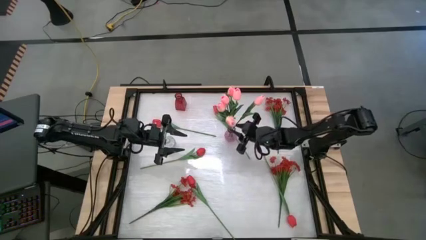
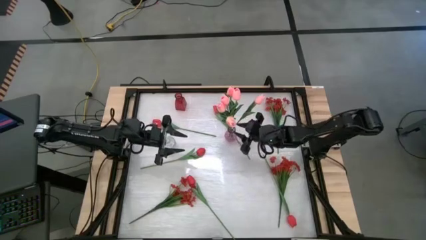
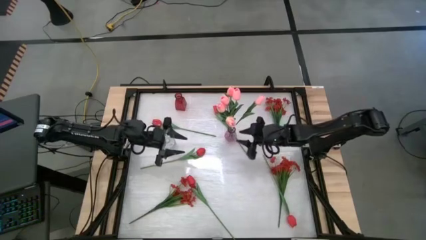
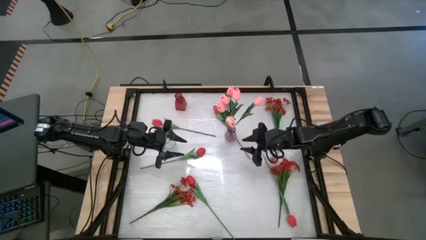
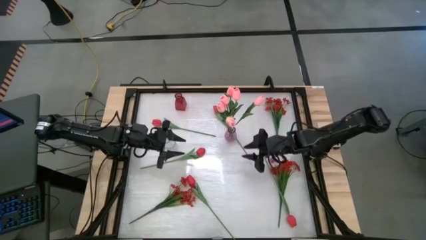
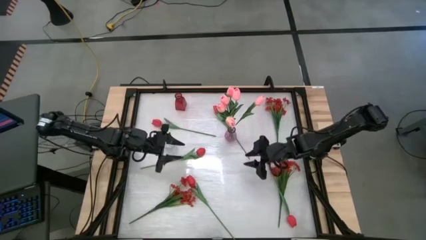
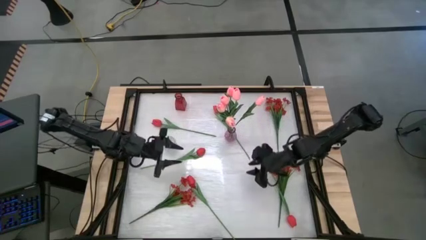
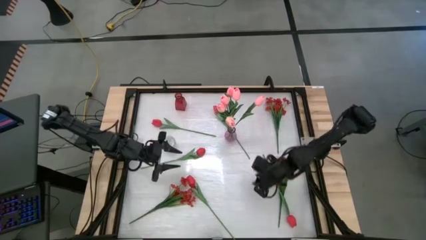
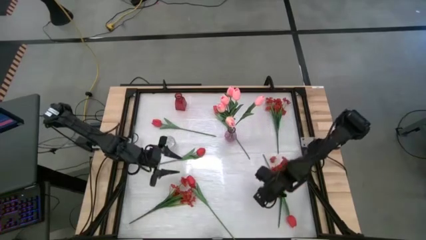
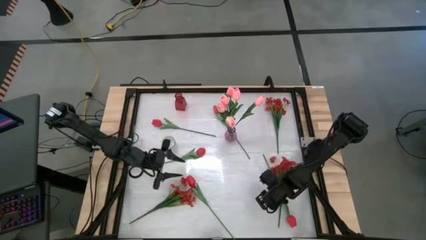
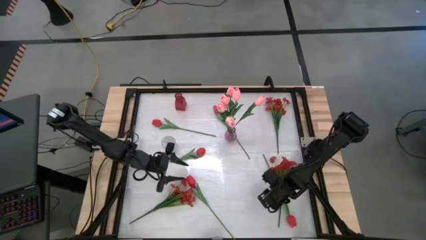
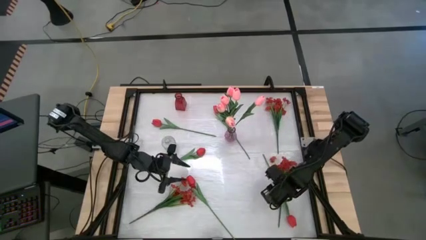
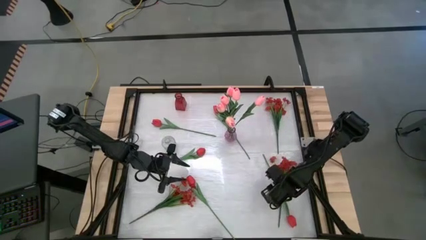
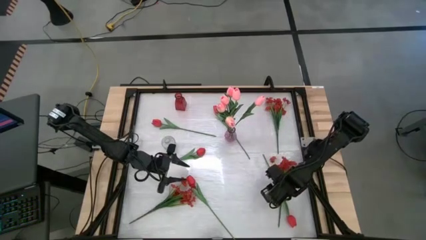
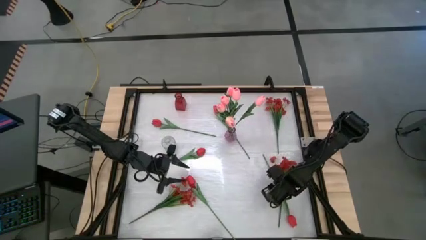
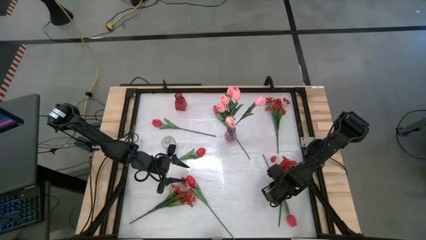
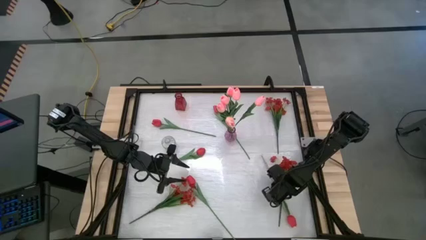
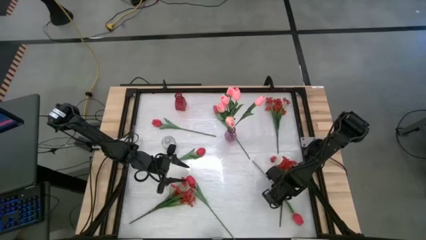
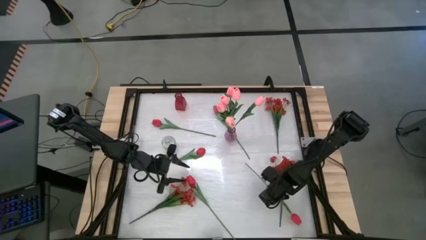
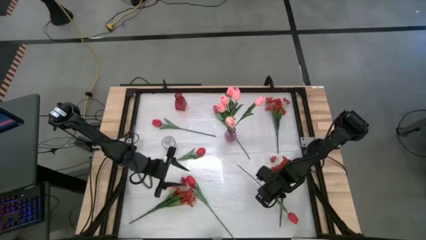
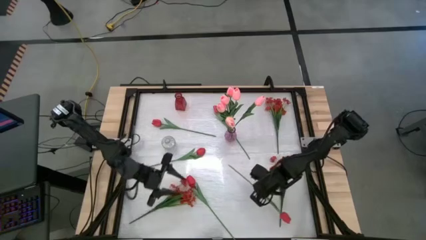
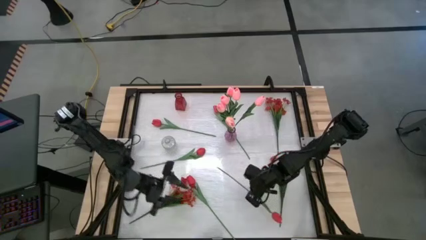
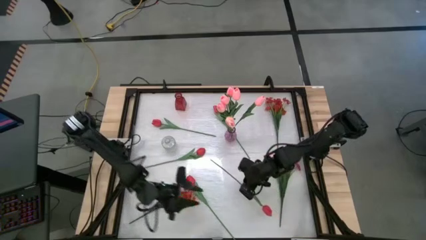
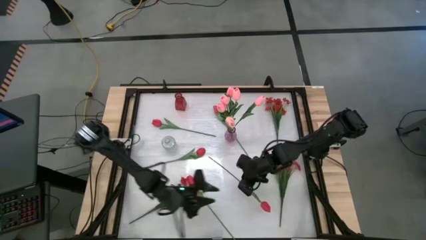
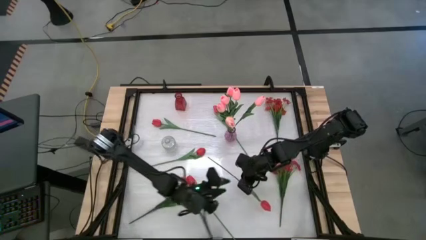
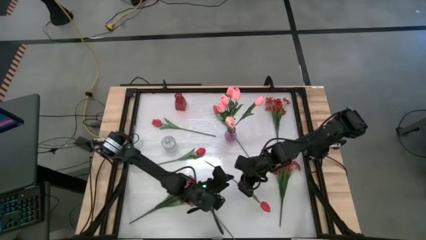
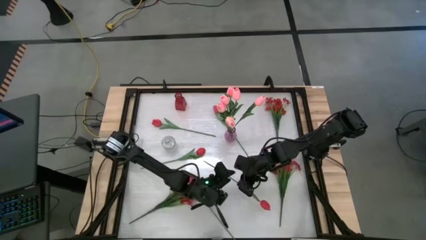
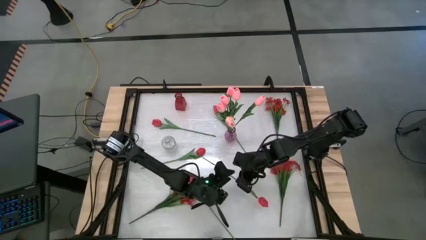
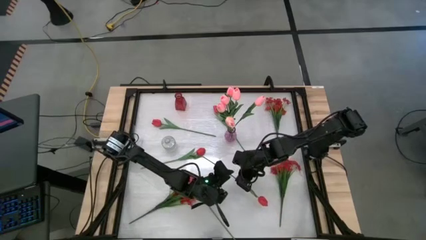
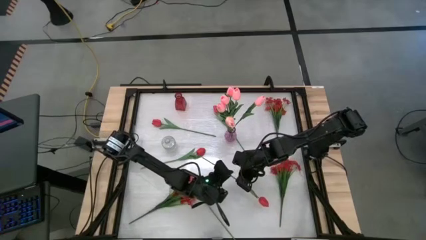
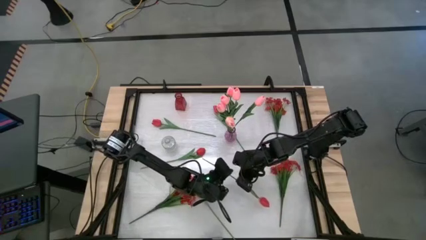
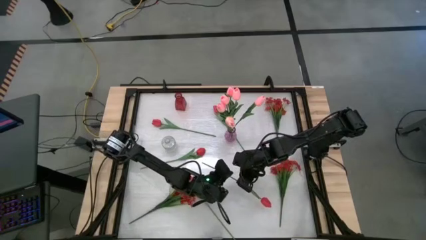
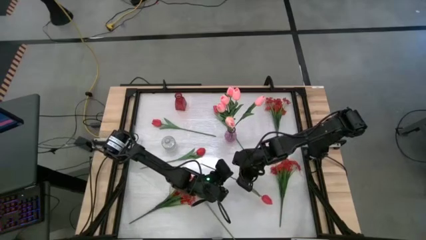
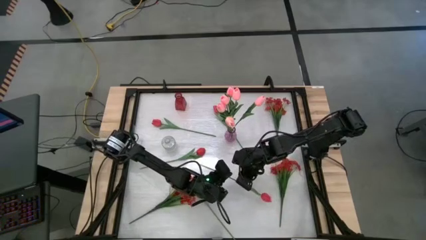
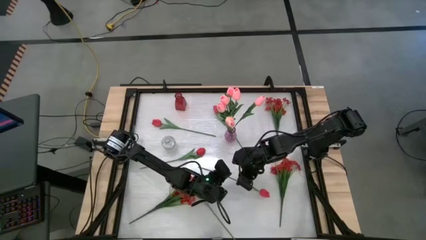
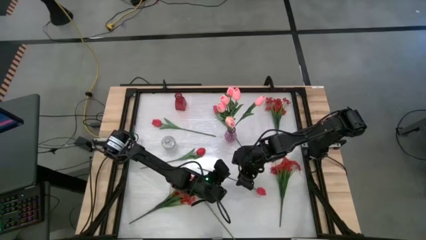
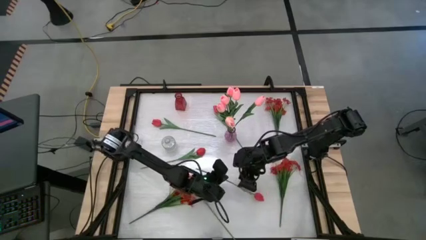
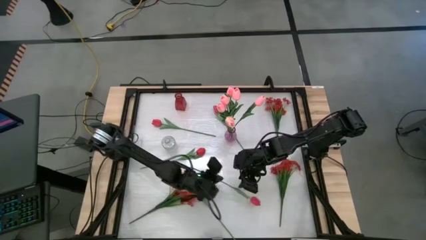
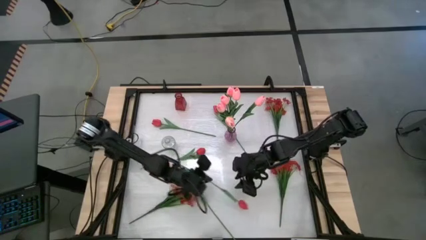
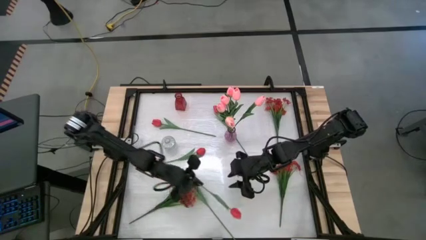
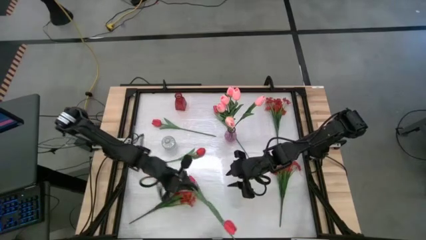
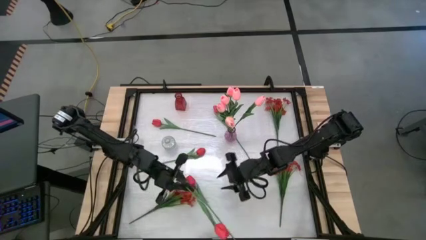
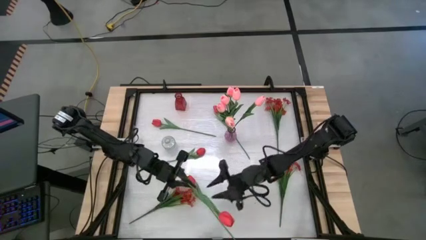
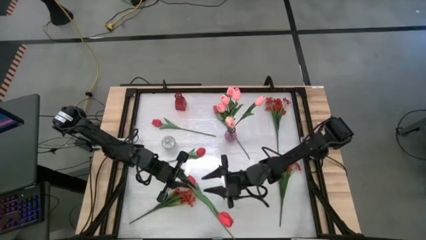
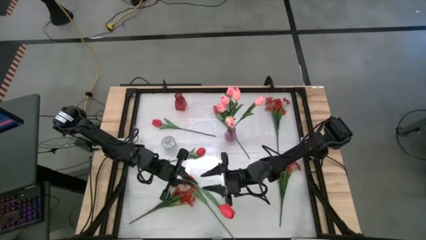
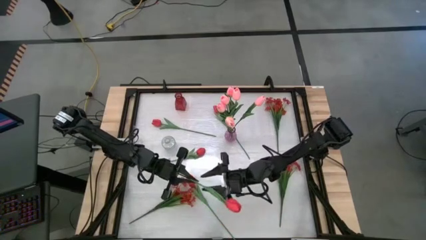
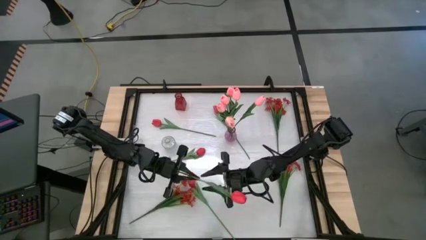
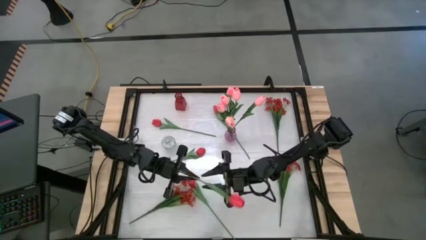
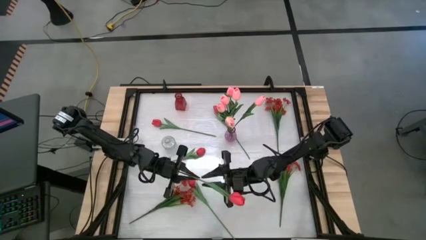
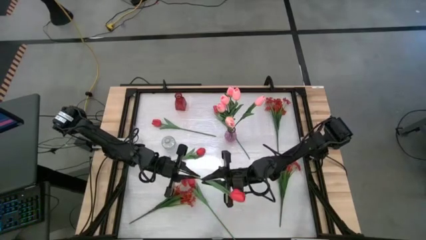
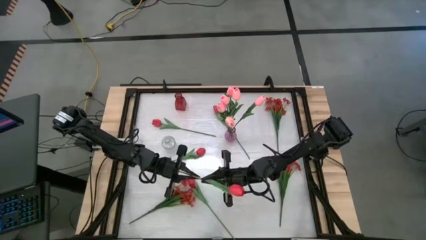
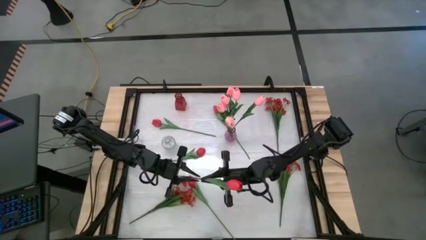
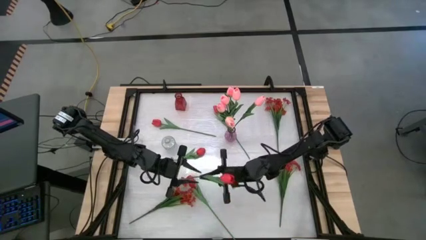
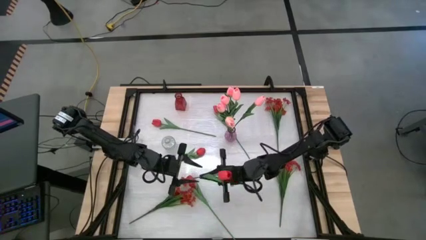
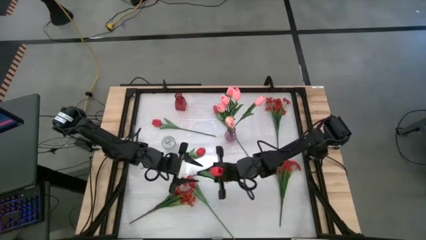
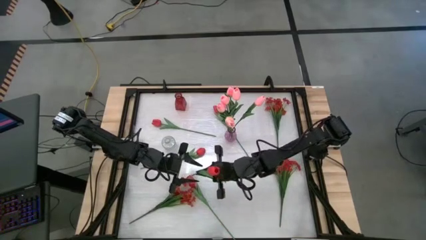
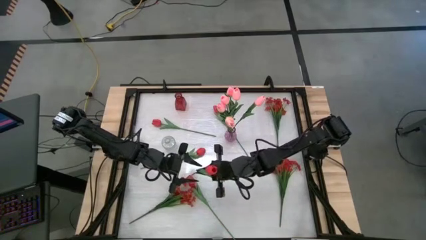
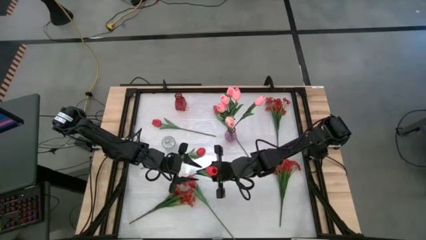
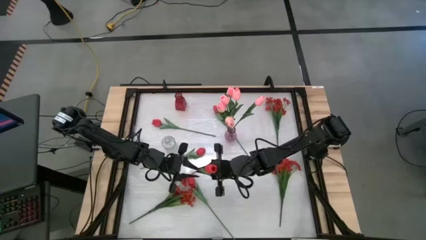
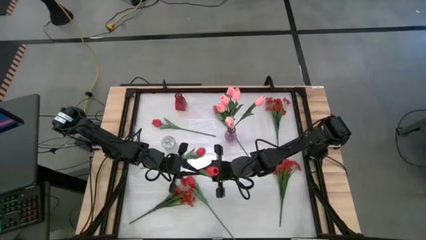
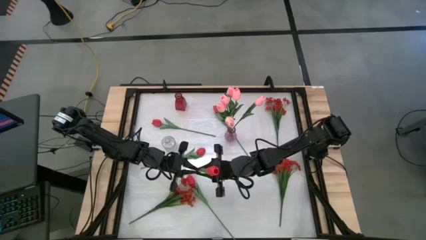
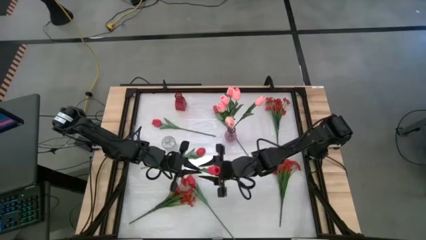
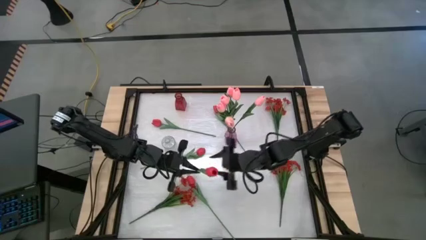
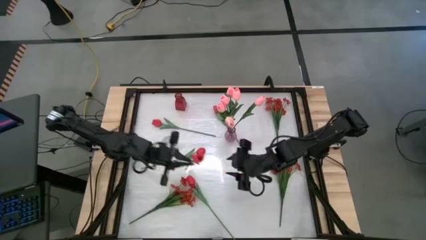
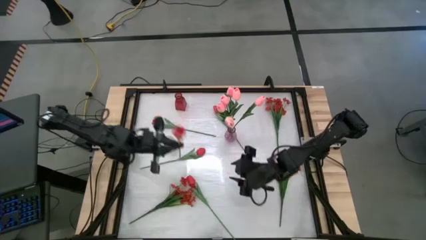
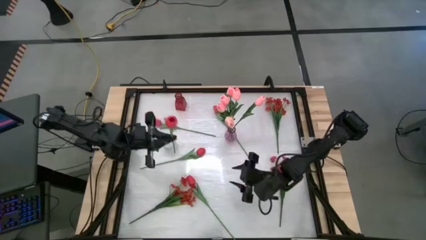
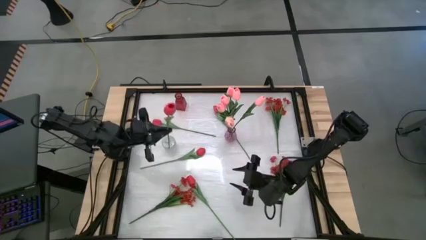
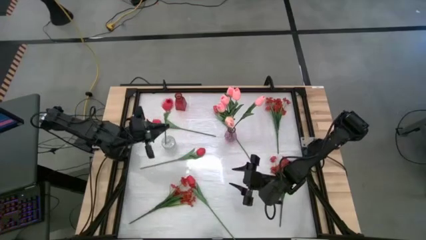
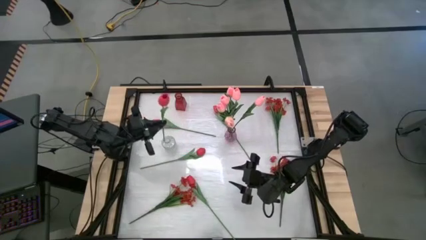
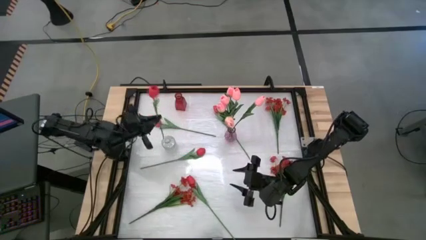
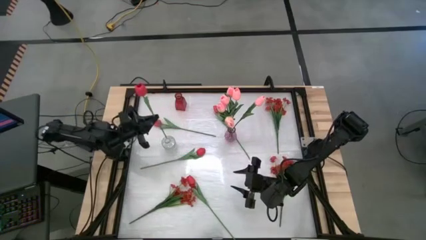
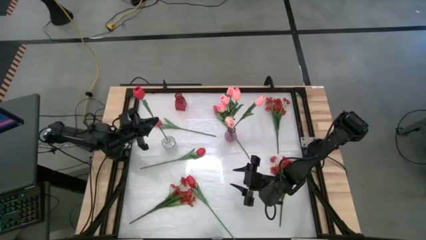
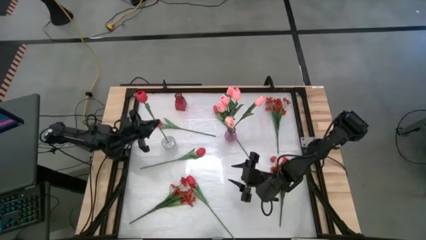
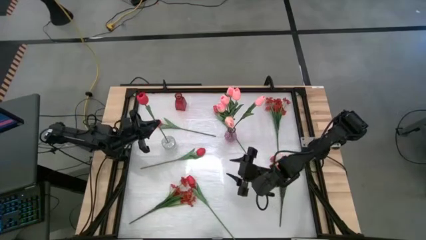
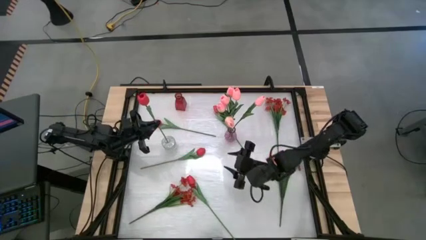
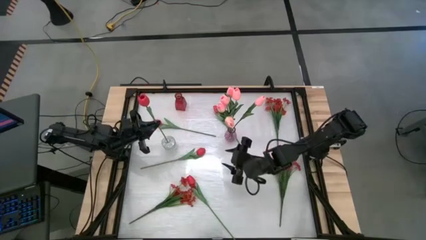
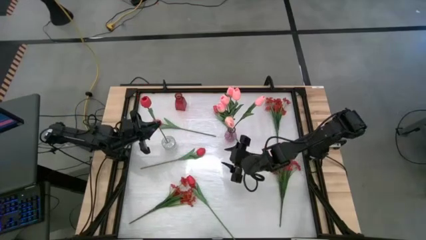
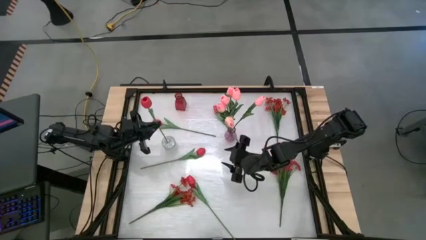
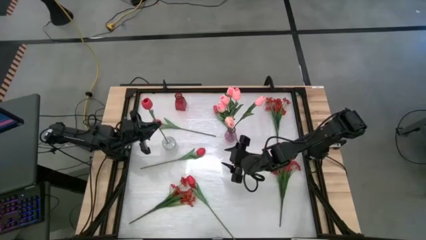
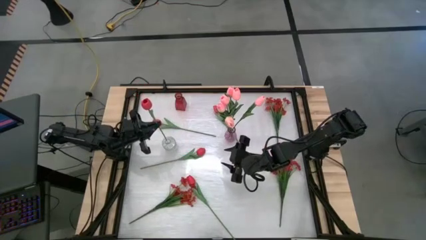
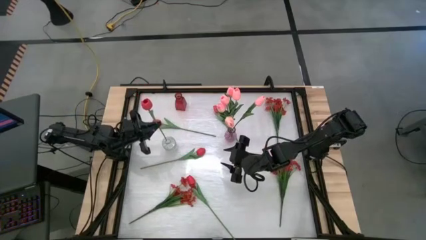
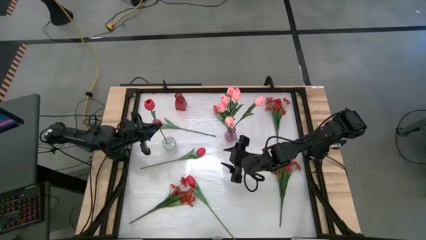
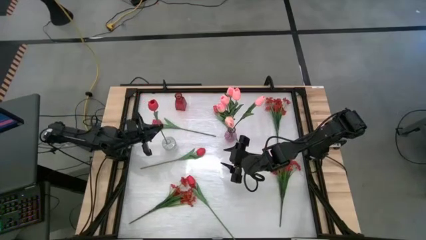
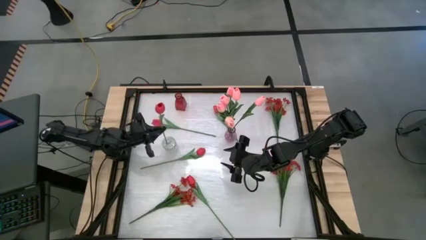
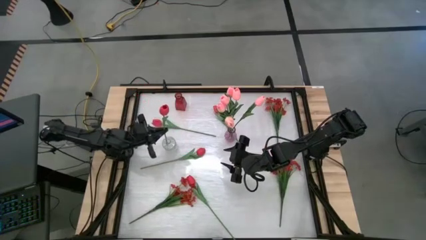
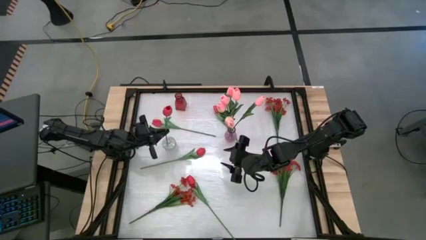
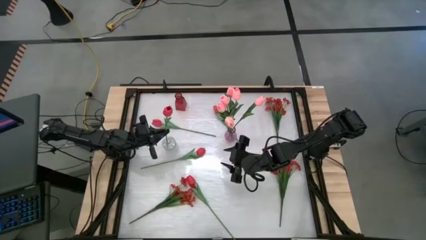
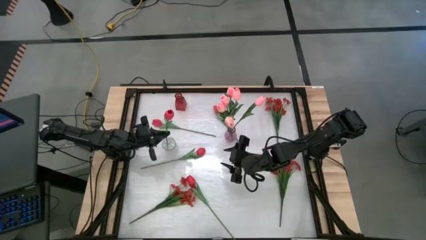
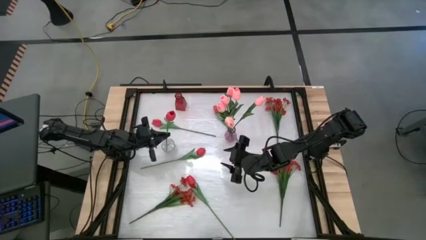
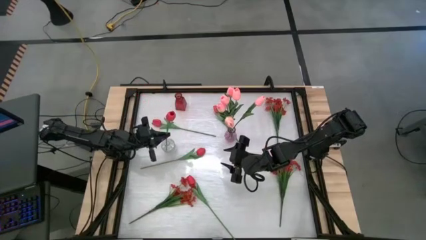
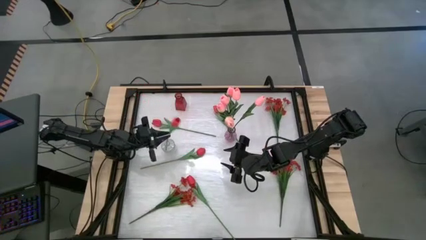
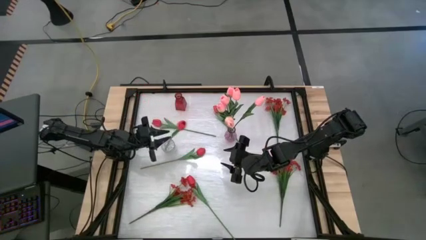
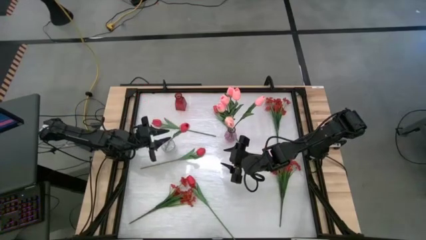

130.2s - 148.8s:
Task: Sort flowers into vase by color
Put the red tulip into the transparent vase
